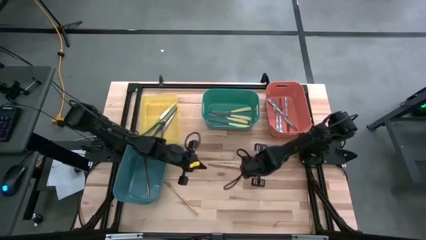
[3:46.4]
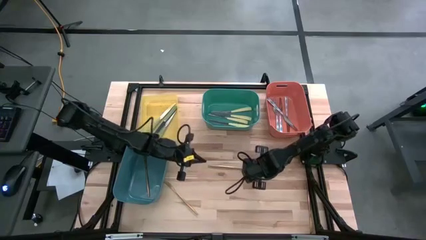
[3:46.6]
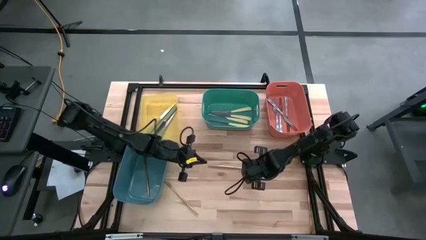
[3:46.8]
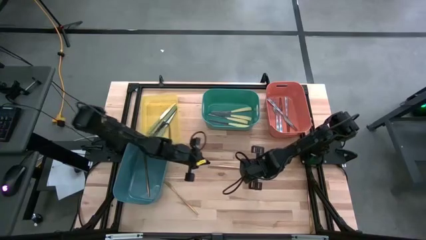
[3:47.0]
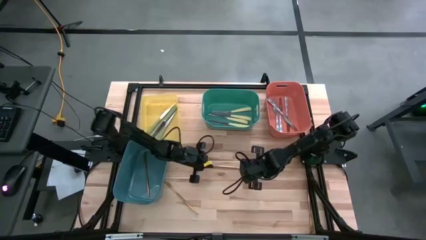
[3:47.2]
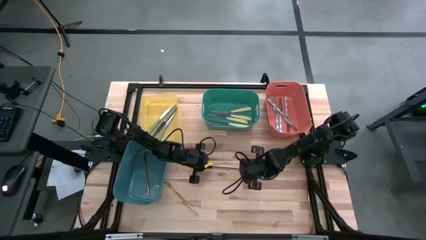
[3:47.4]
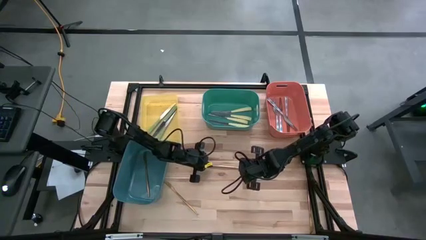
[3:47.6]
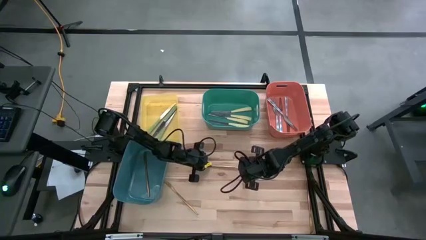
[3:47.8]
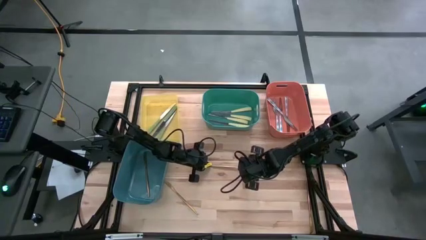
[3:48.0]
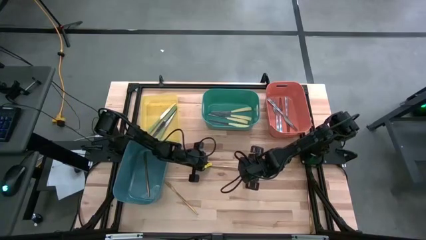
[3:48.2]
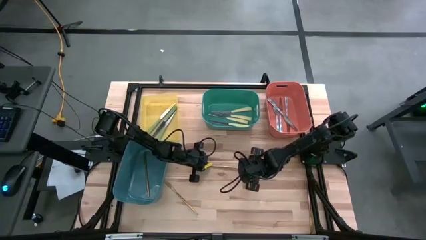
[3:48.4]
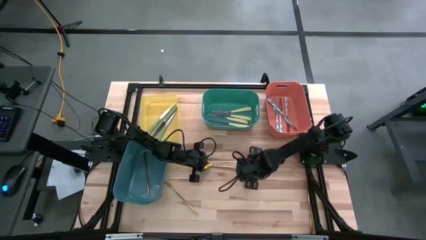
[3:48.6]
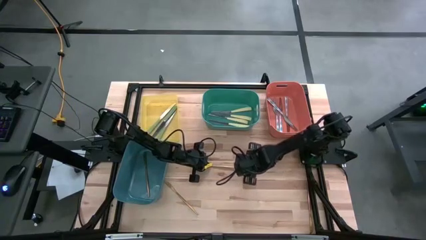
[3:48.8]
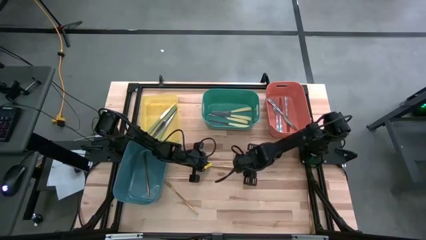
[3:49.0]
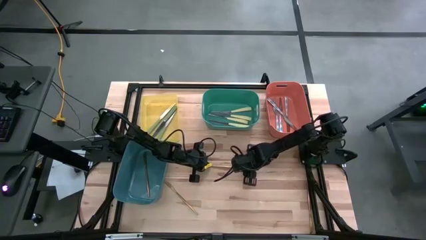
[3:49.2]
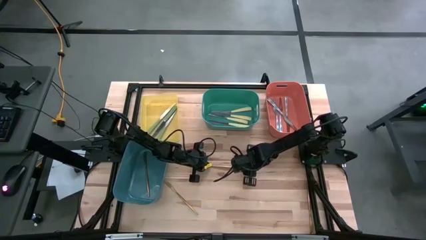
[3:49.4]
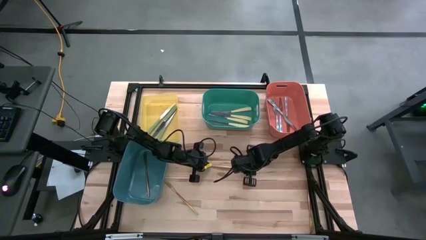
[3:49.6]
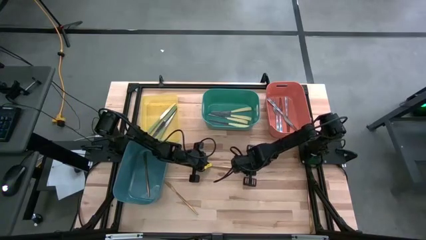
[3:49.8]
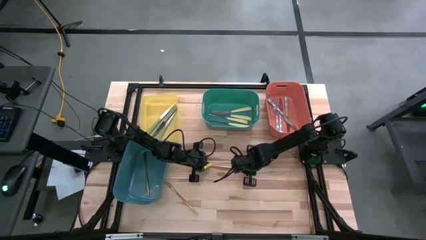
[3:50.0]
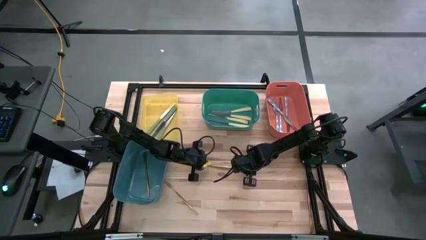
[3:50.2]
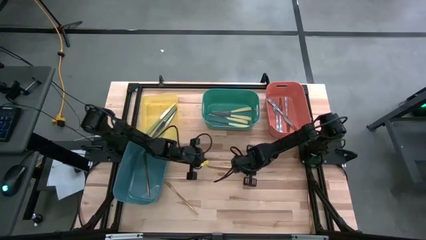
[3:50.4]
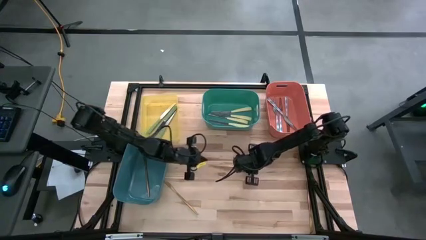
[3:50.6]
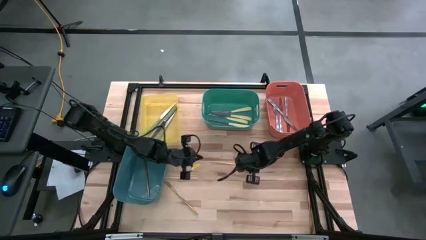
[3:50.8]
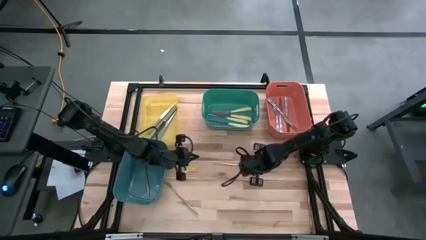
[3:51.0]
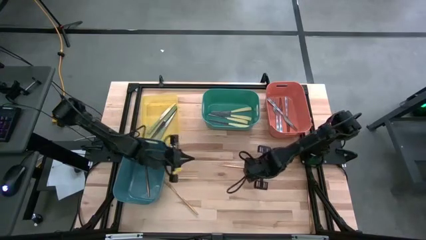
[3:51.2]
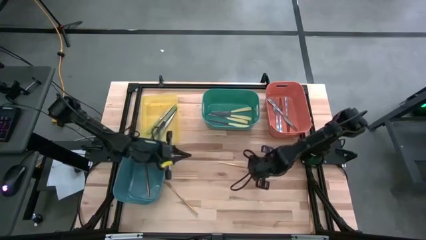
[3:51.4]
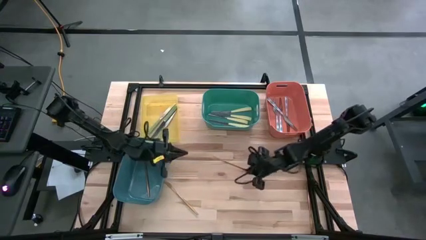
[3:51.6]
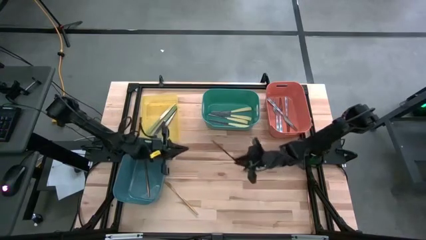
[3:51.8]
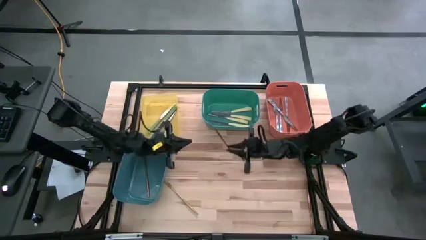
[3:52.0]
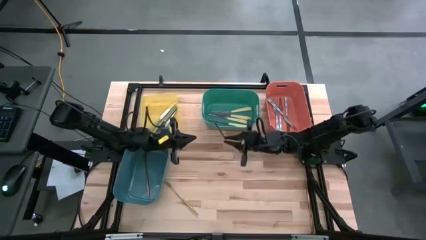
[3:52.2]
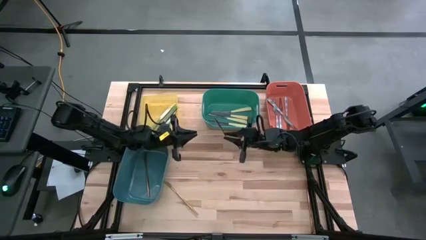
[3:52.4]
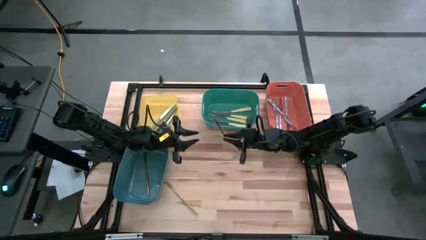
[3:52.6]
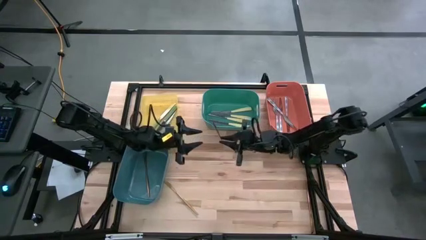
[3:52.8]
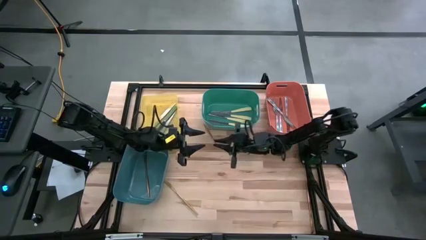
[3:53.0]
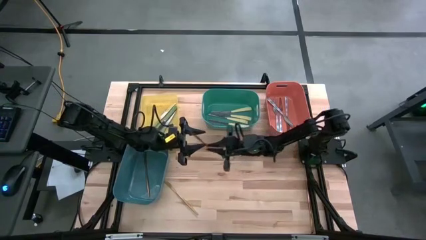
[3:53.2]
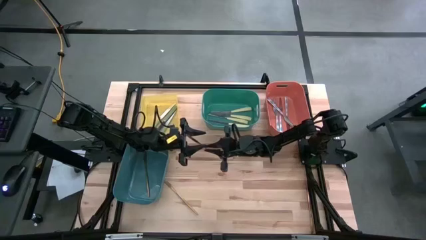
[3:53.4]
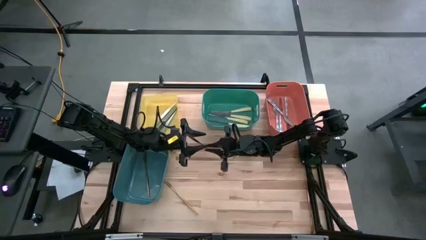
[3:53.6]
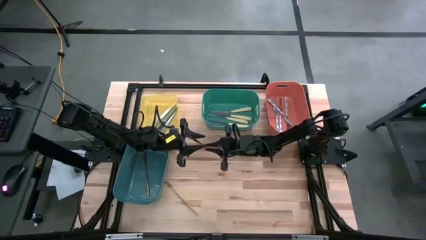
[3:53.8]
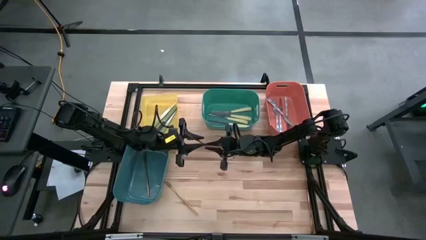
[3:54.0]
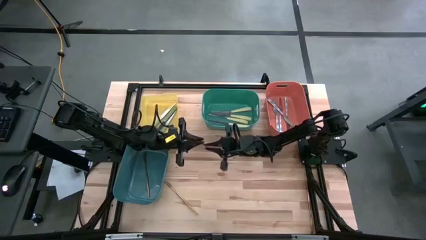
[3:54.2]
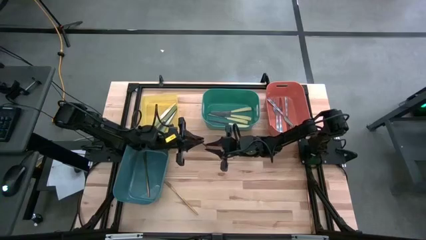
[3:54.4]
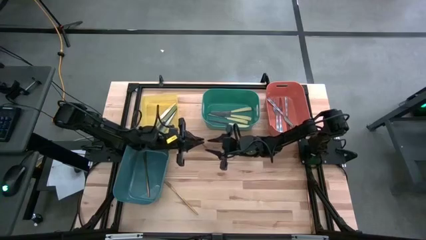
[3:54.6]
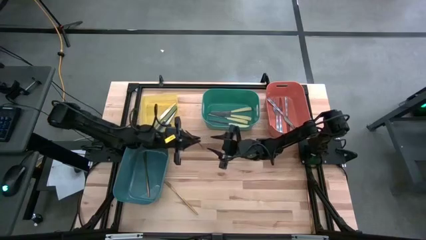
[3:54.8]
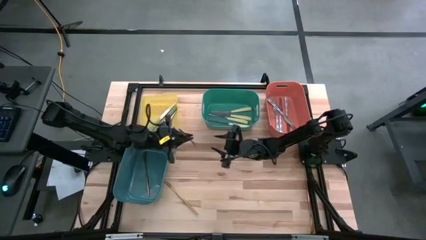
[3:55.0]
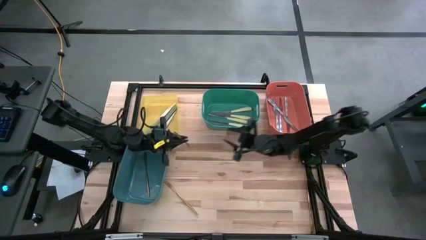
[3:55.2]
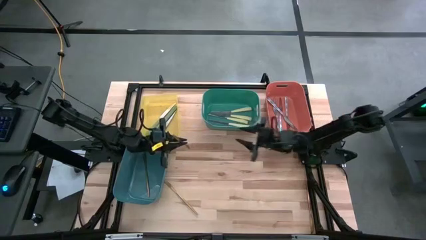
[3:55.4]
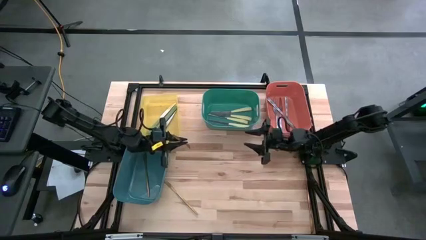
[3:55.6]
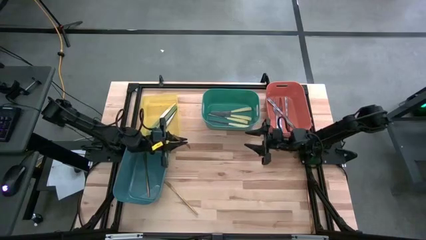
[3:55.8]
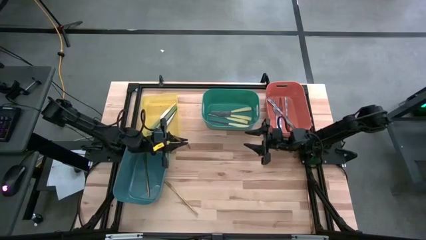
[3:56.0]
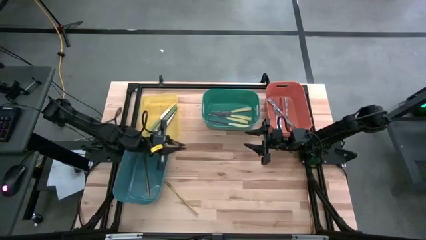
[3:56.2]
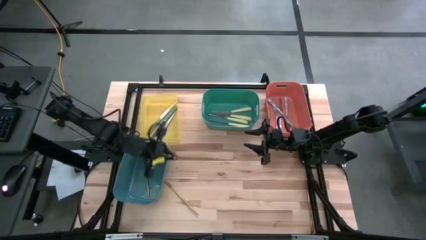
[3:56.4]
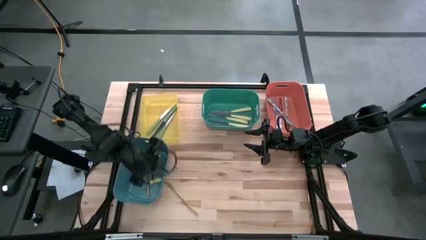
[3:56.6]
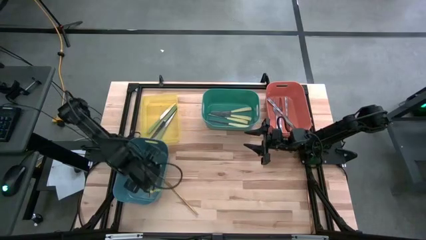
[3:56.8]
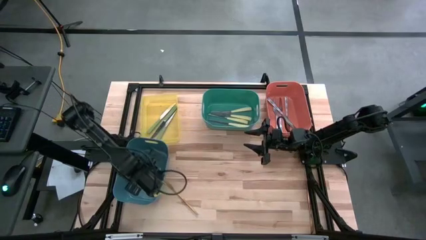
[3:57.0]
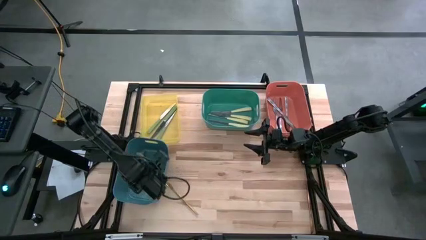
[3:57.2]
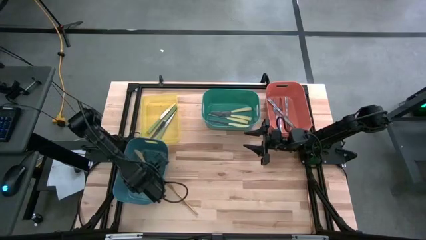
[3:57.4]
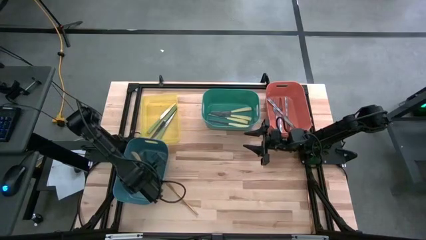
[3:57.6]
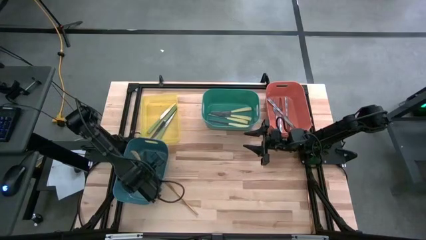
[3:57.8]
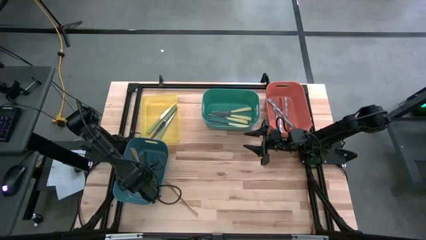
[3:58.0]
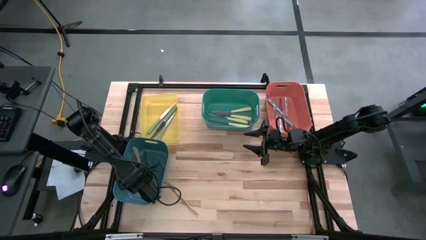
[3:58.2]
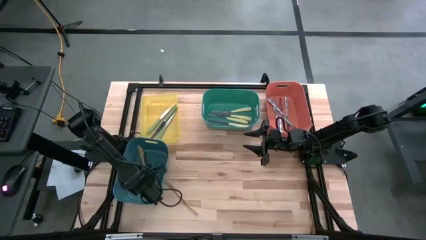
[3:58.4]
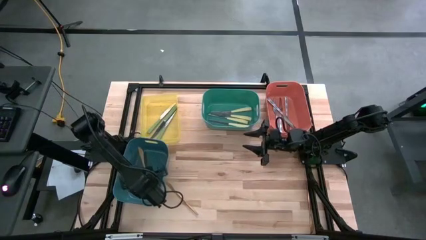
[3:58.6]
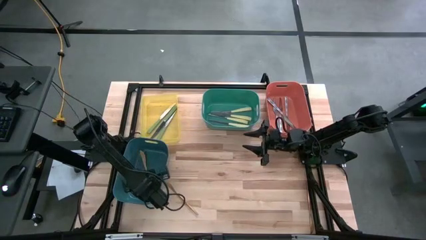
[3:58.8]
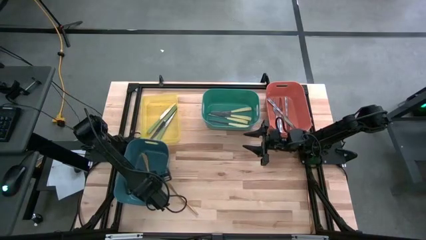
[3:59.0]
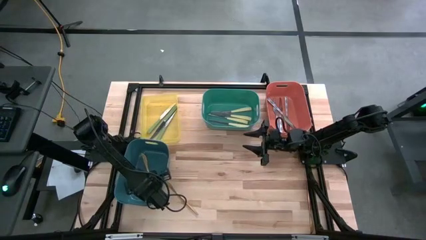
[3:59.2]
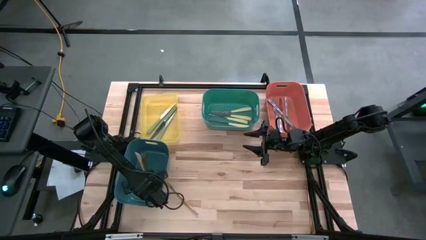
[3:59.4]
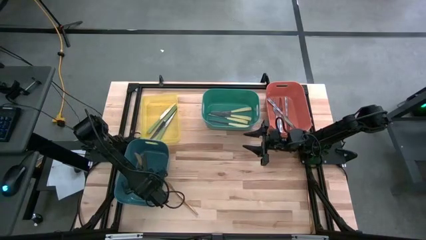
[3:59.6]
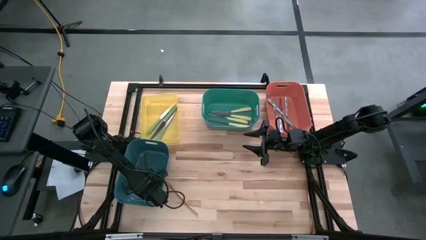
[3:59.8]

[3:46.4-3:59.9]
Task: Sort silverware by color (type)
Put the gold knife into the blue bin
